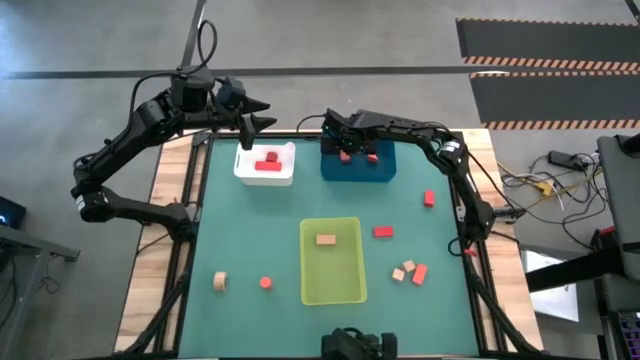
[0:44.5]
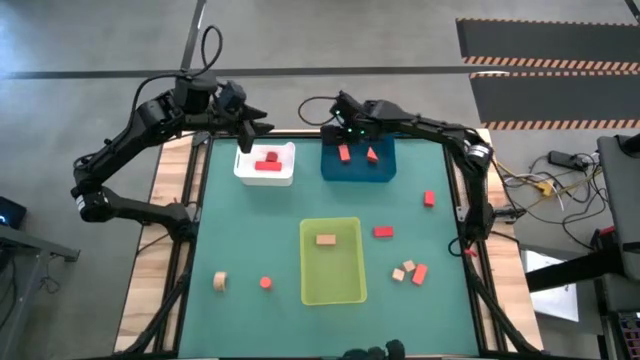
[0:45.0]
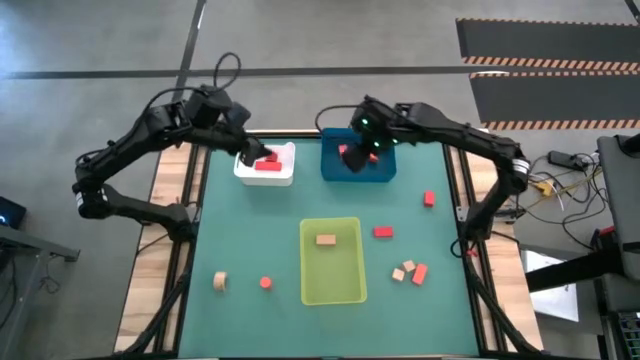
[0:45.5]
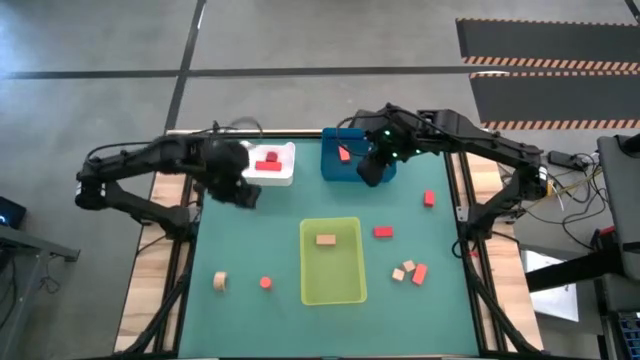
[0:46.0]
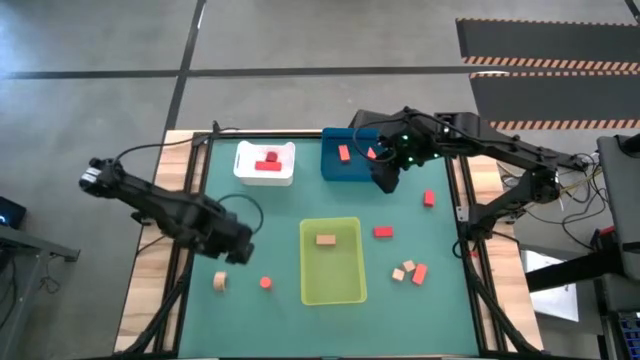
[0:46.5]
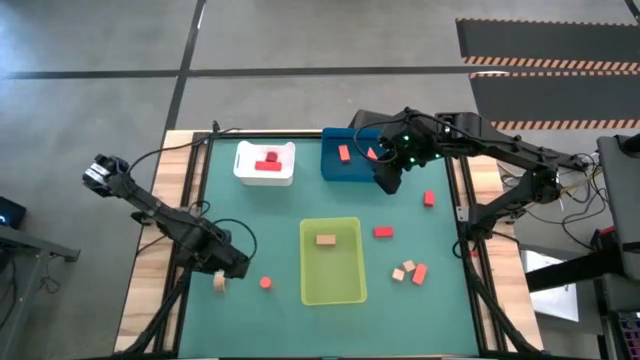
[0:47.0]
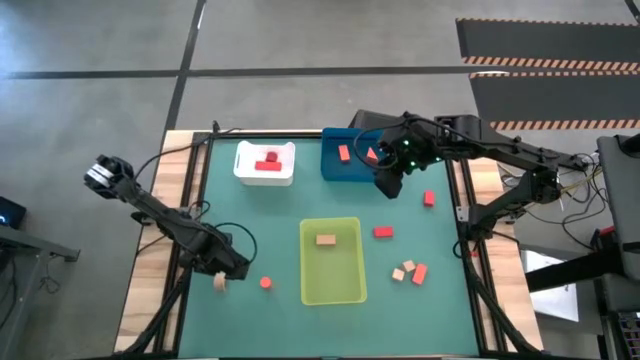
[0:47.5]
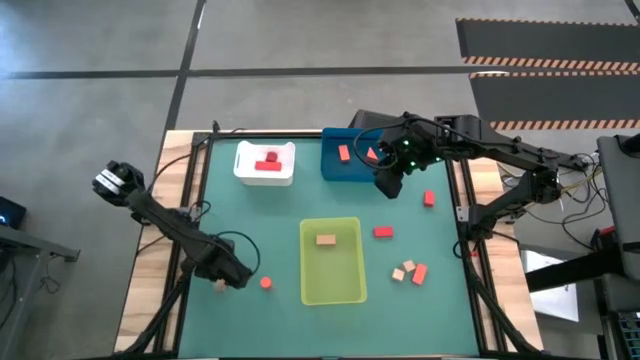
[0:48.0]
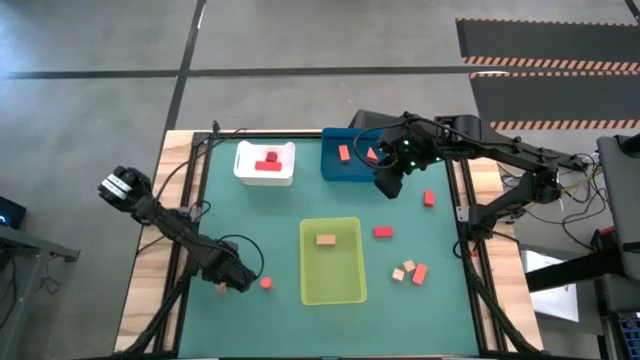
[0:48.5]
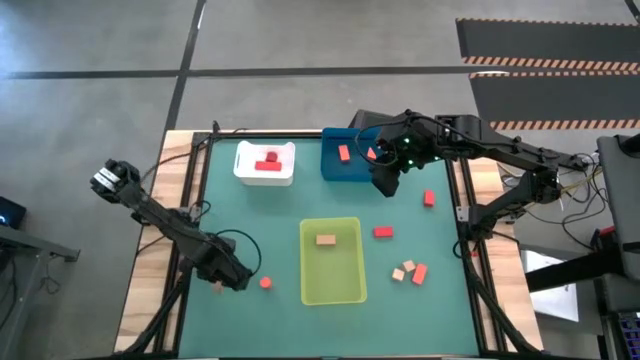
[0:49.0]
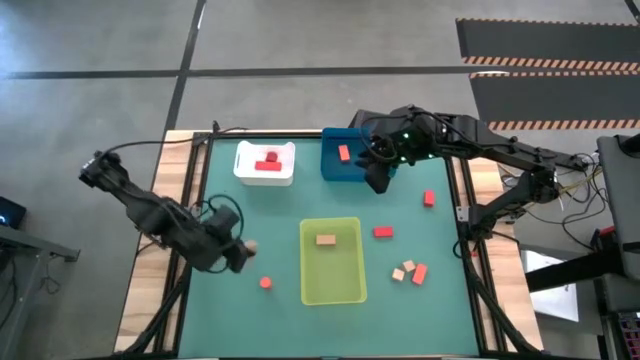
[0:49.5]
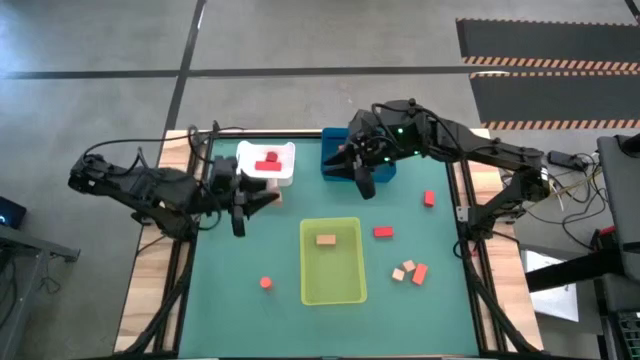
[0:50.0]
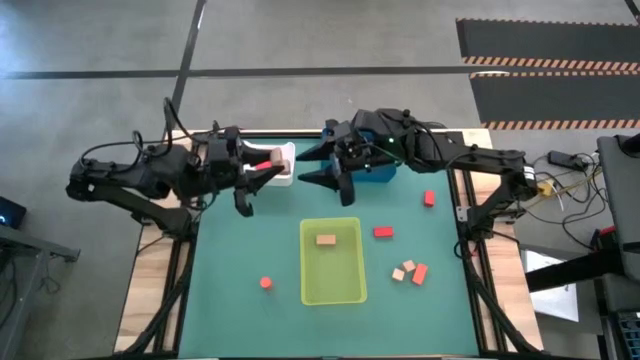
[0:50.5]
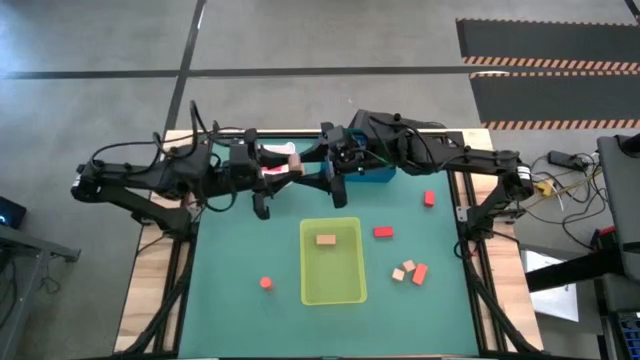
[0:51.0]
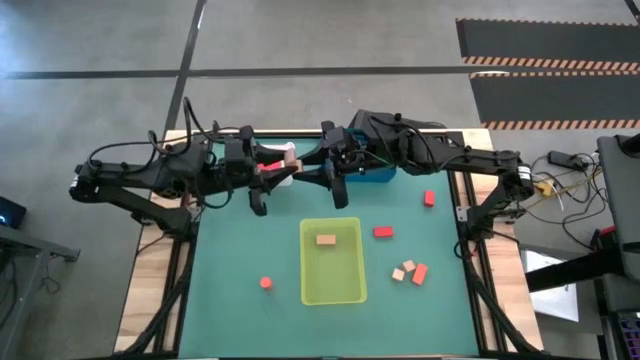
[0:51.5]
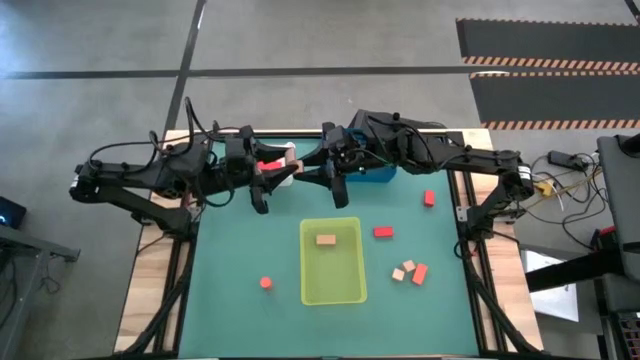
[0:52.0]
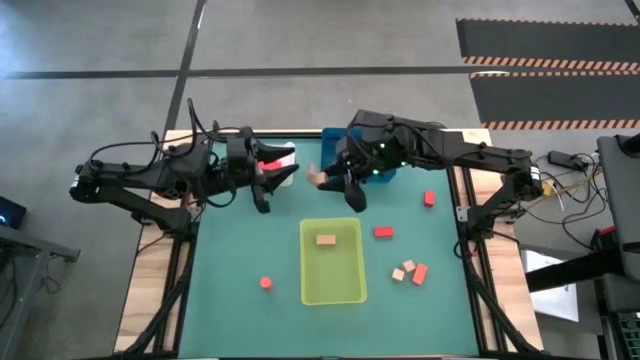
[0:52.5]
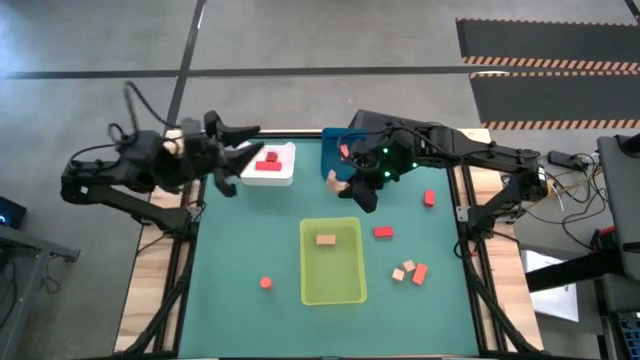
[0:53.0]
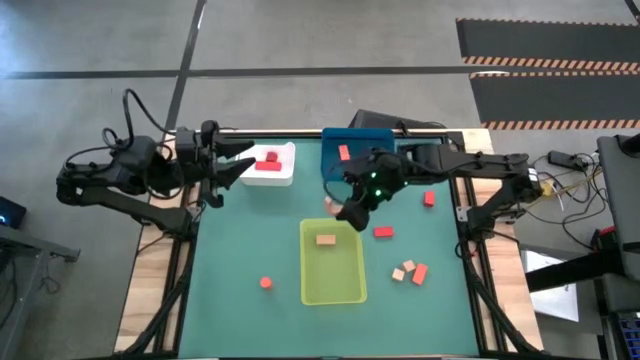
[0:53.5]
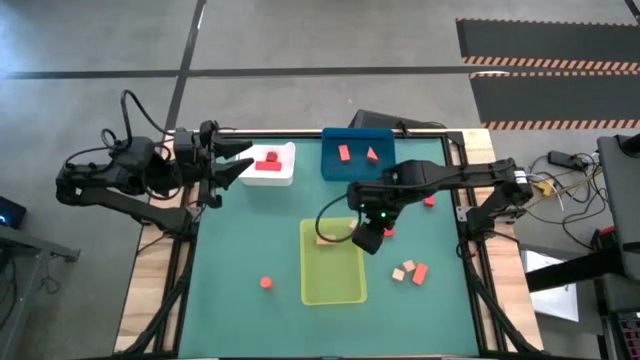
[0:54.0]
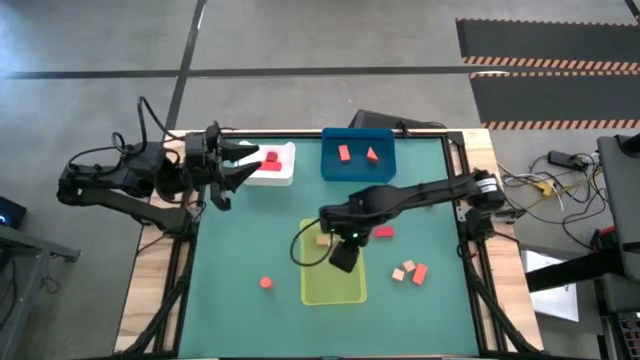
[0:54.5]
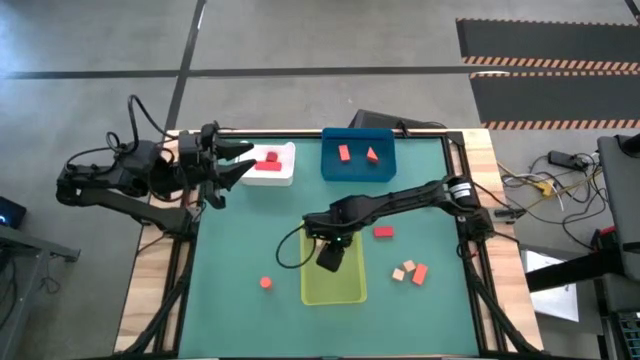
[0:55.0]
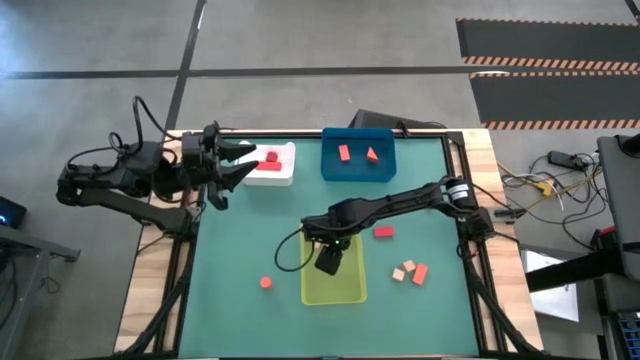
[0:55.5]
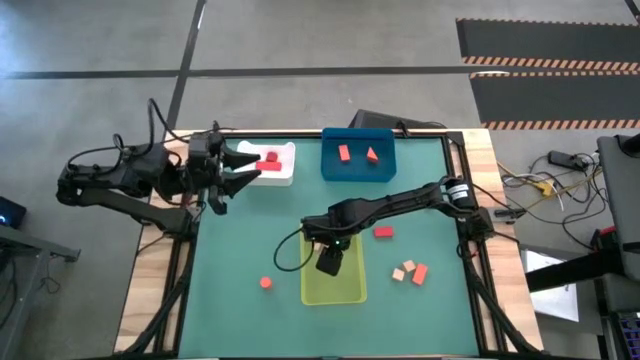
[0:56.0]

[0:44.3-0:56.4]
Task: Sort & place blocks by color
Put the light orange half-cylinder block into the yellow bin

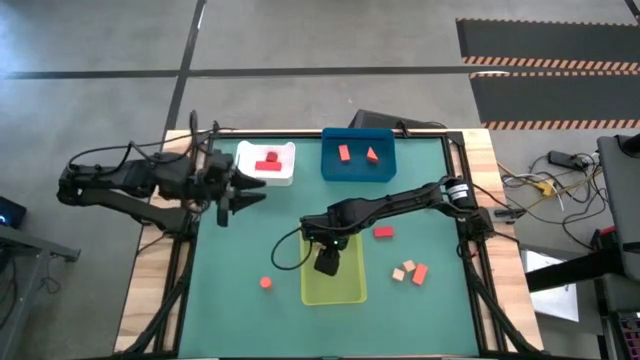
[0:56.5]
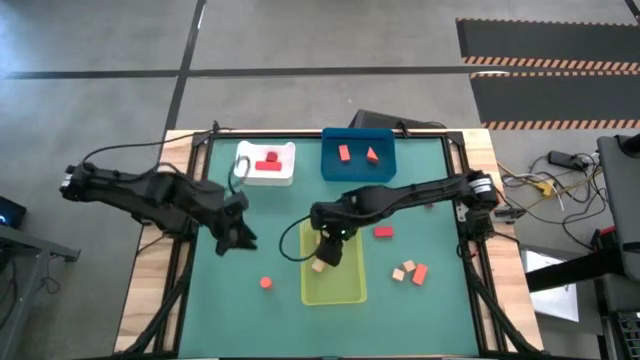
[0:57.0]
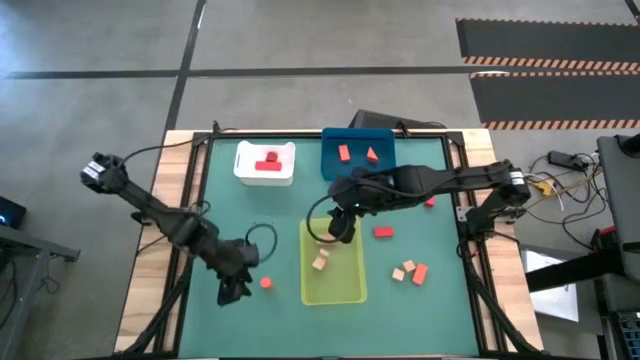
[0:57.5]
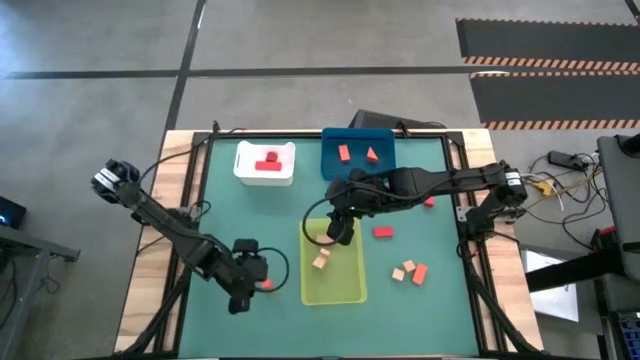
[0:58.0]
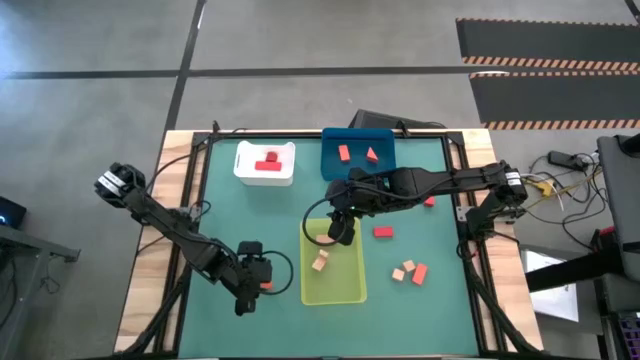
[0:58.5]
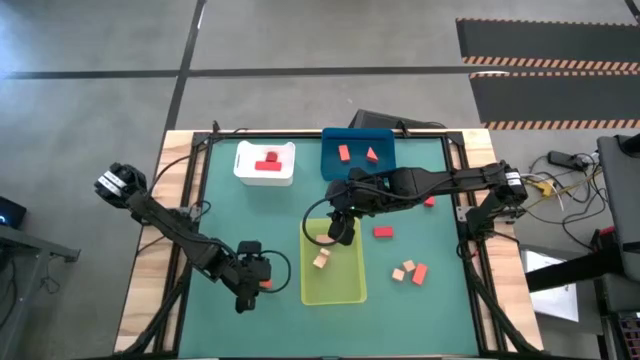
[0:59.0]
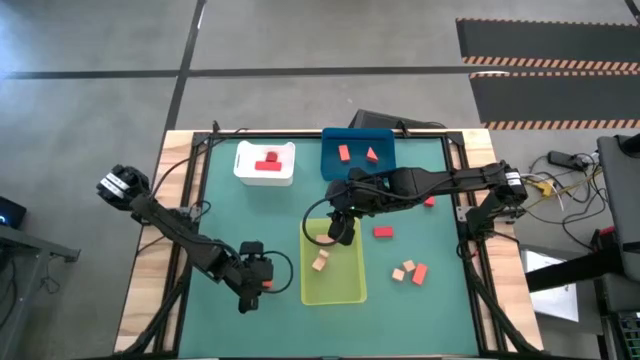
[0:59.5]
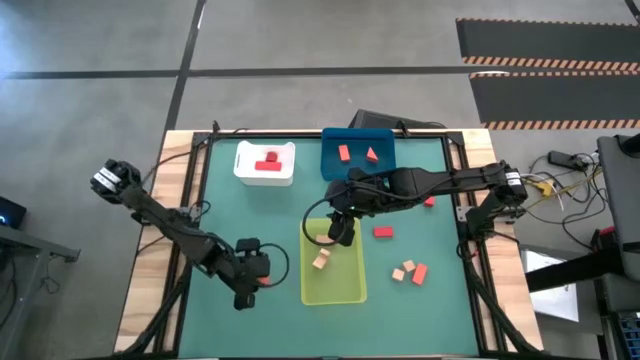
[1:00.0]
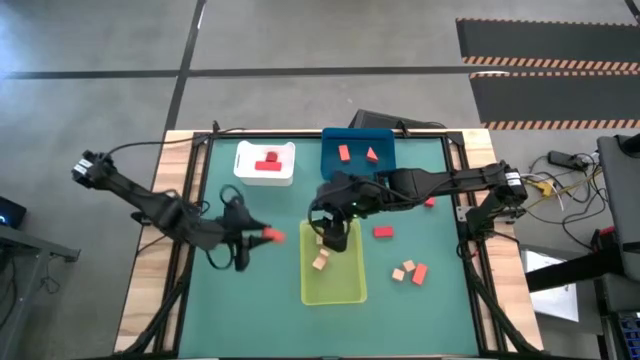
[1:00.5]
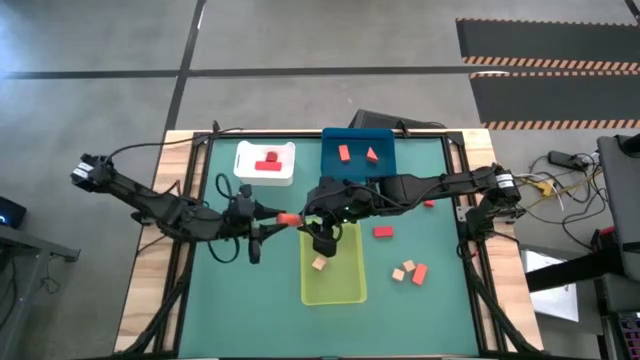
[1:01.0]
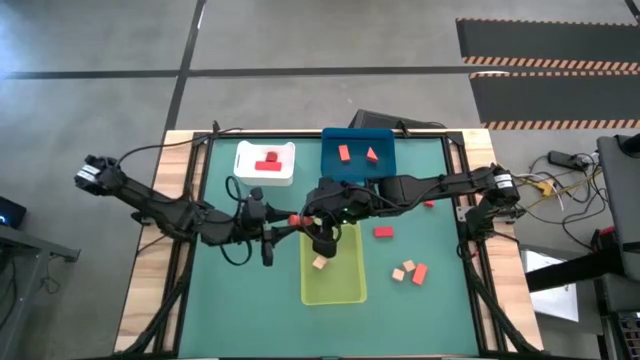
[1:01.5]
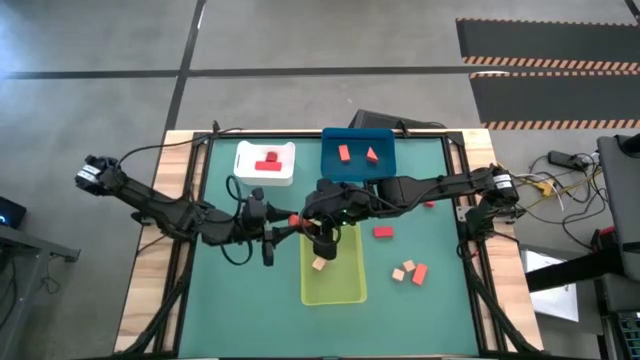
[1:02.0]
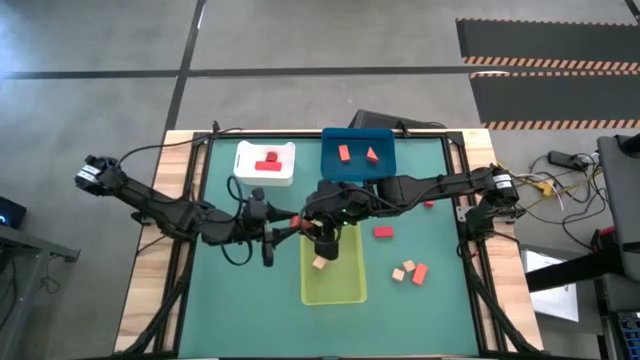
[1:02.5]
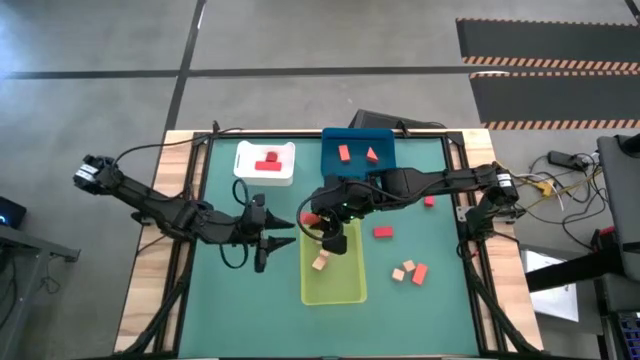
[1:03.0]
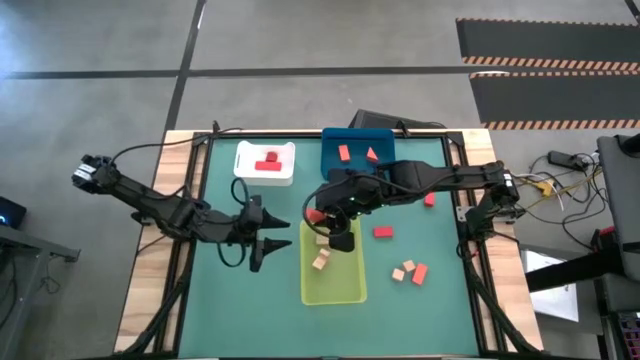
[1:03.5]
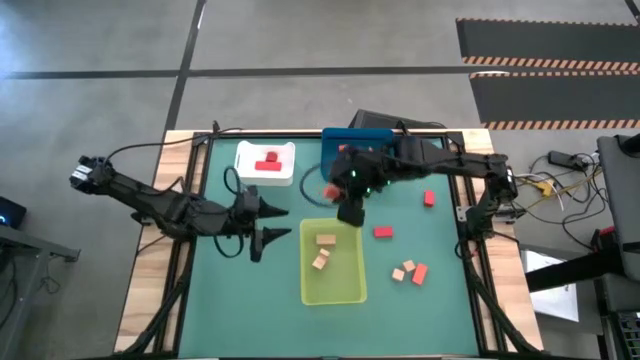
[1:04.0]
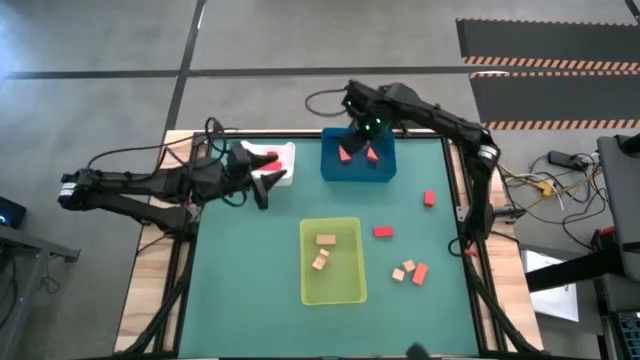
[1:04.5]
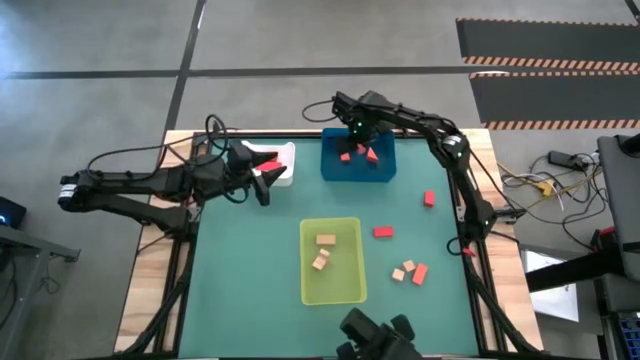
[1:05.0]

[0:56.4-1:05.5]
Put the left orange Cylinder block into the blue bin
